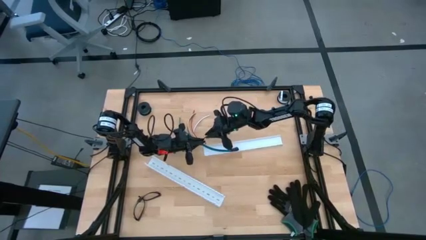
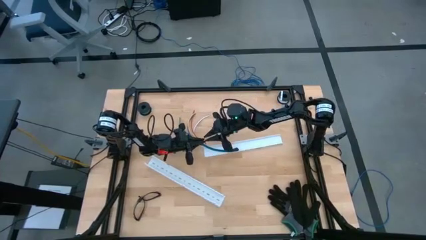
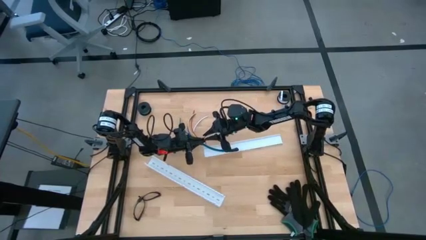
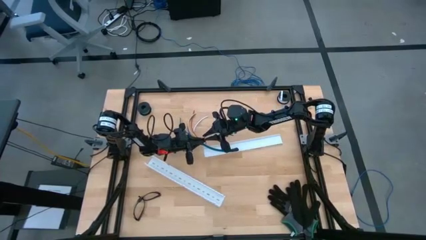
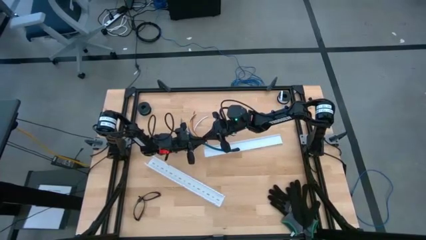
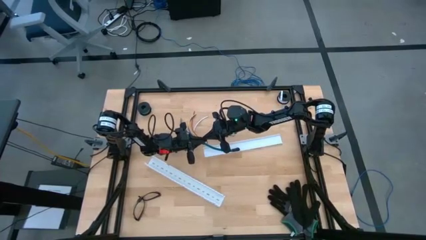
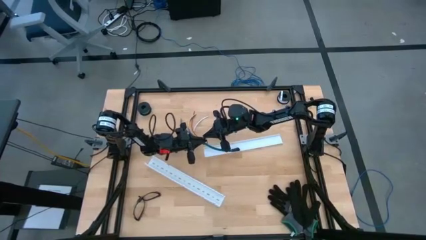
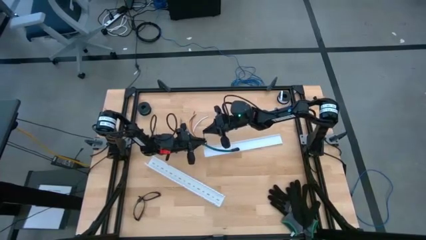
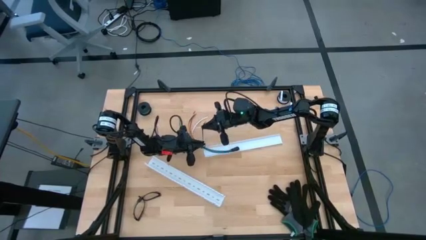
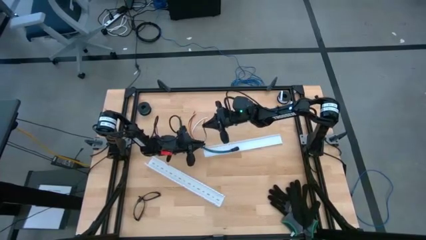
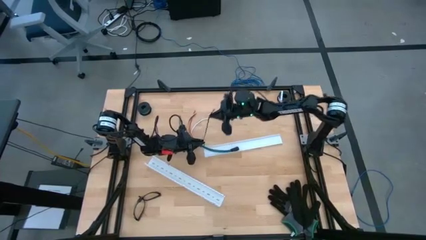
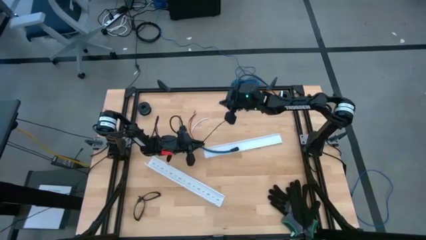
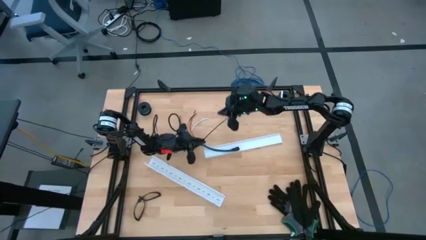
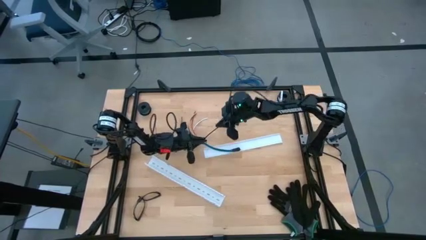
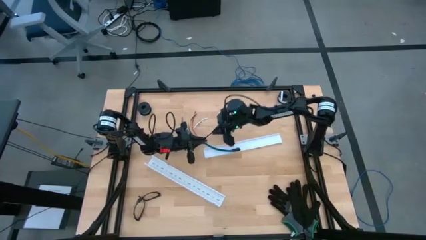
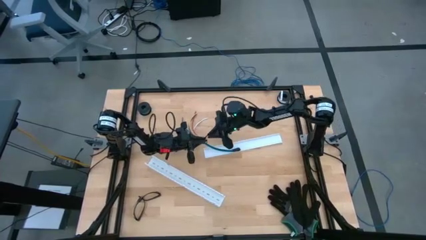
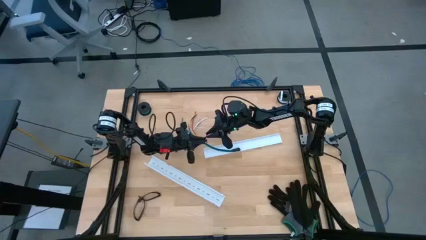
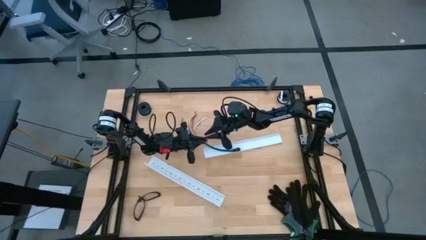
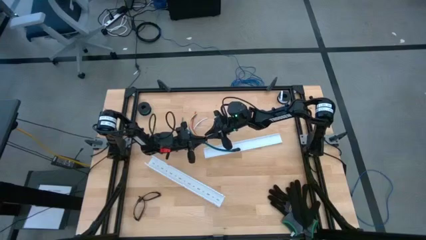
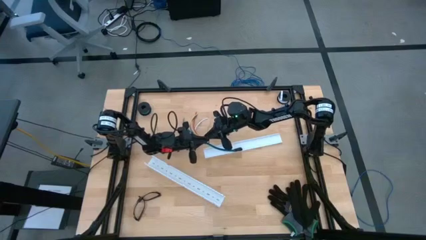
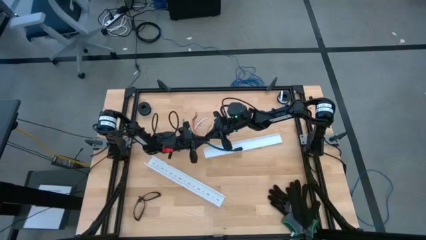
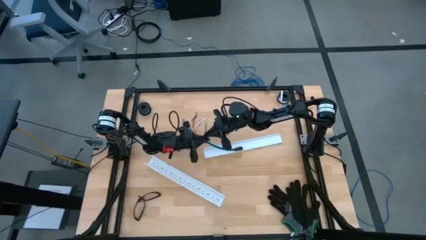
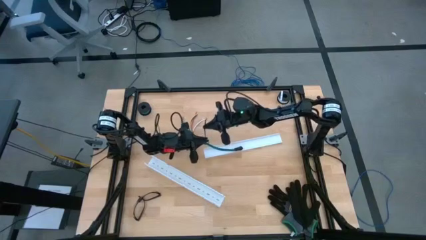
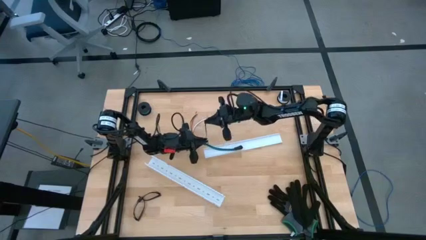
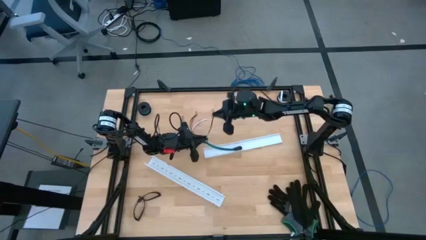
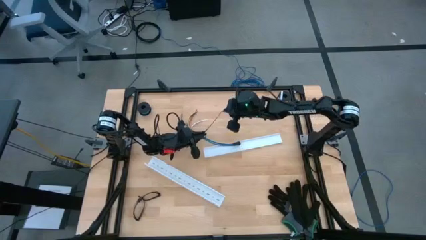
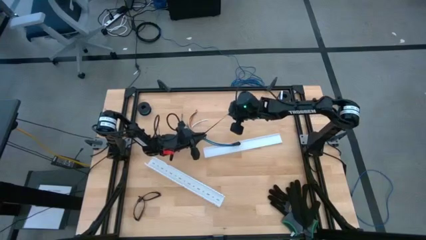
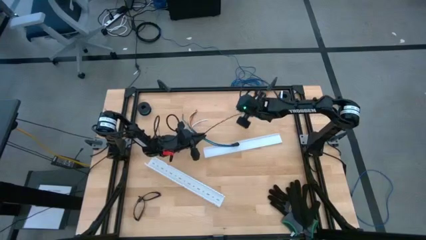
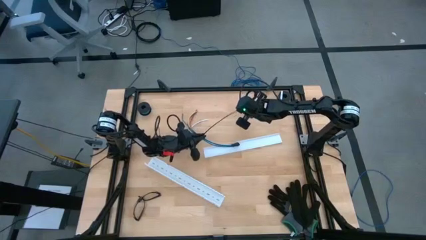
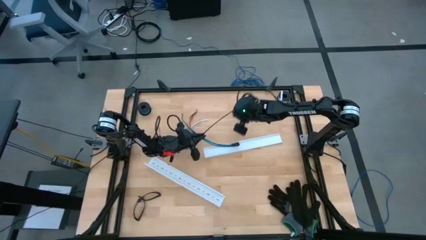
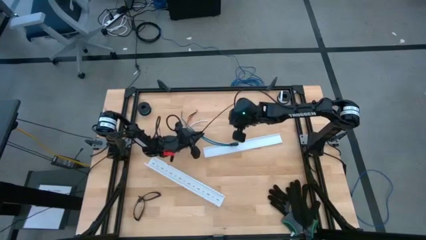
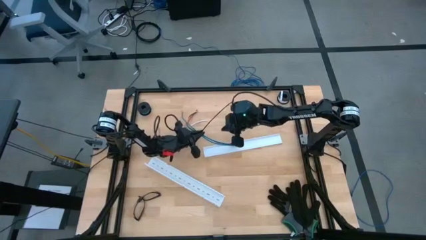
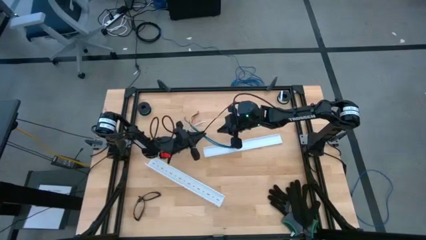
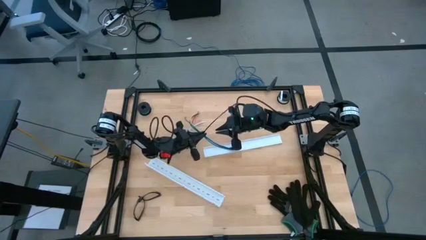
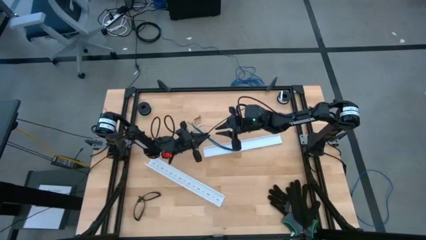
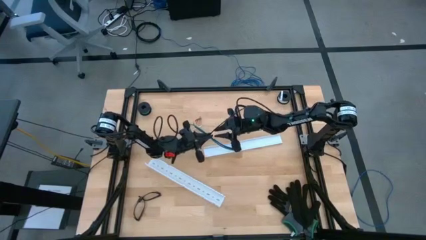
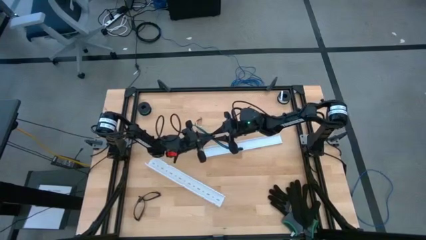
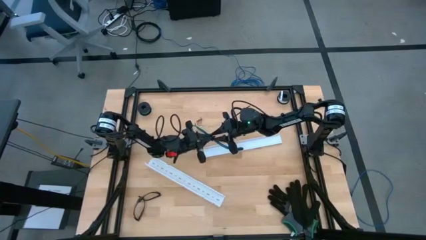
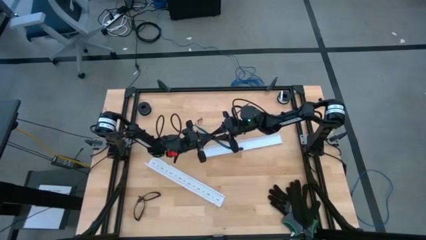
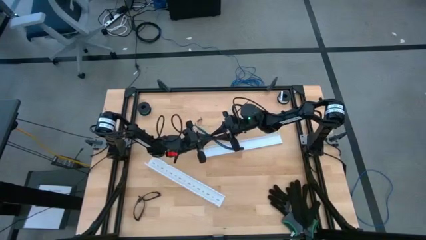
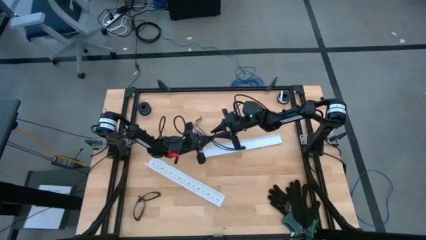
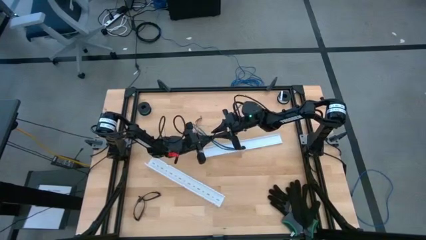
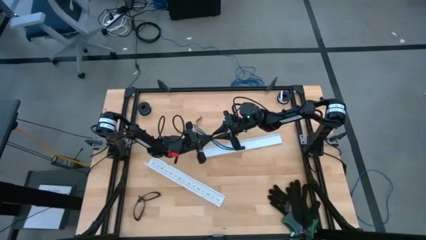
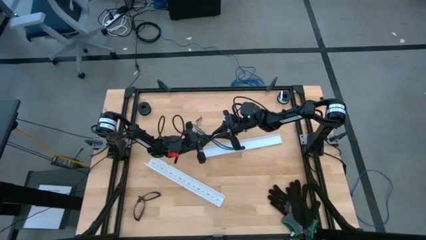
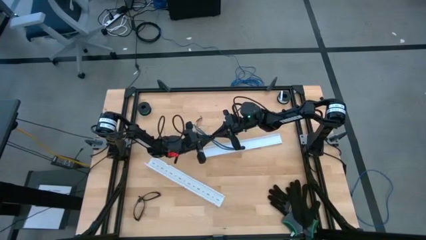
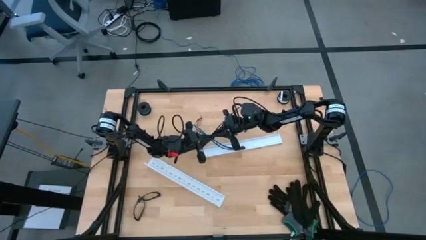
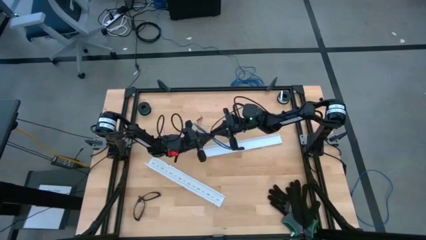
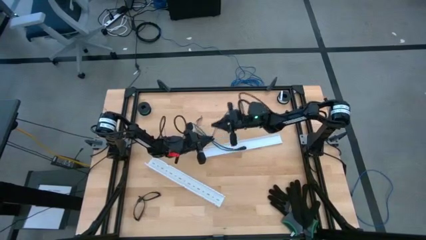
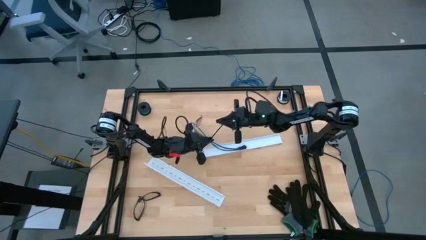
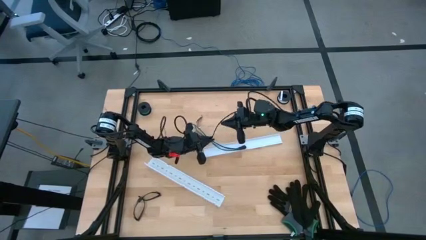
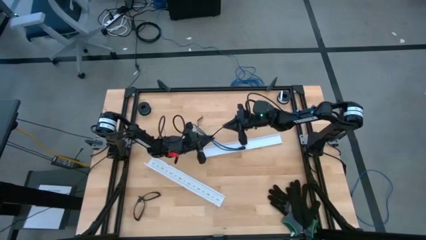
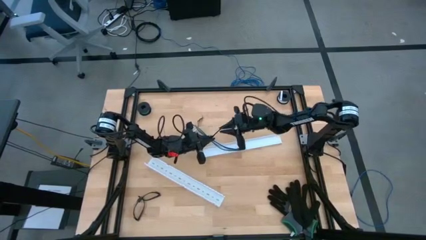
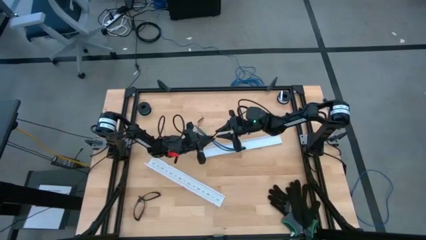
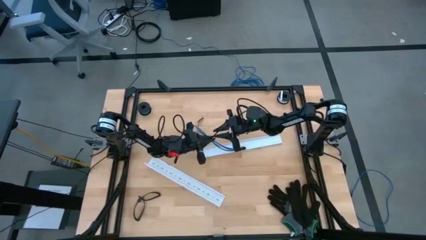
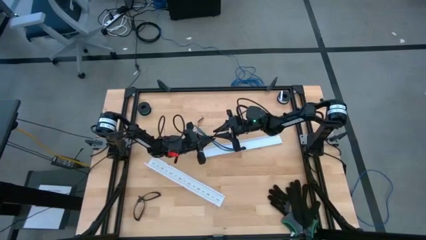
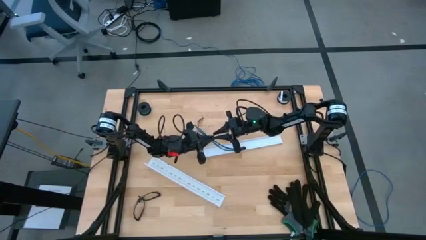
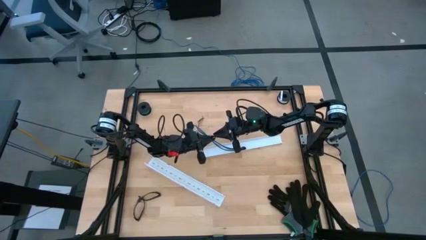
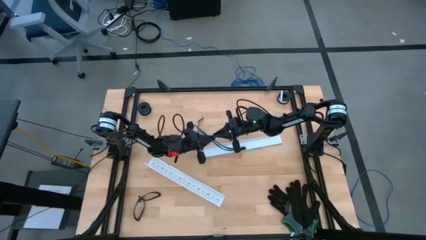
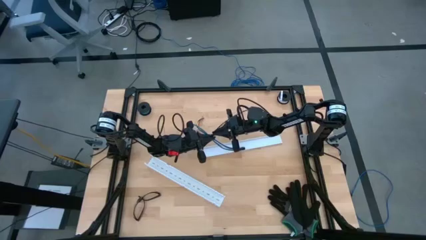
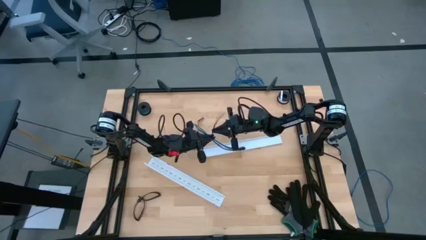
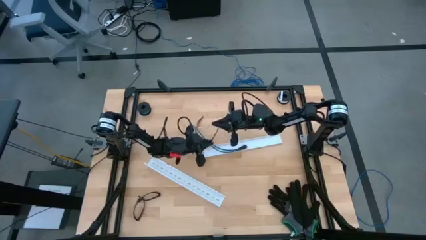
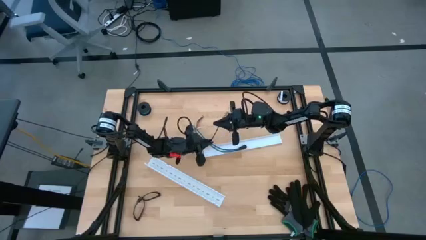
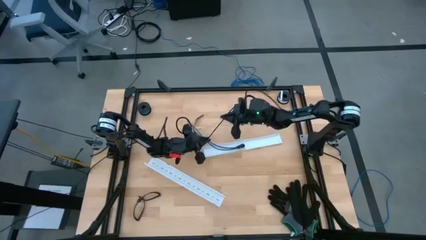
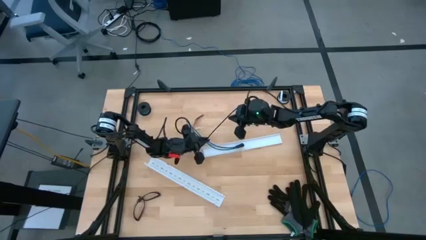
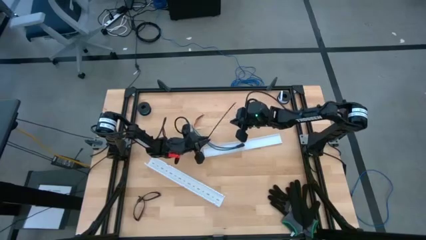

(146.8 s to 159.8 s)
Task: Ziptie cables
Wrap the cable wire in the zip tie

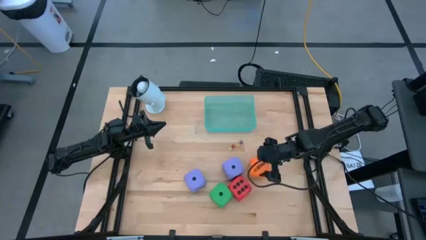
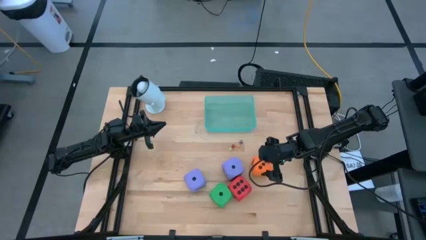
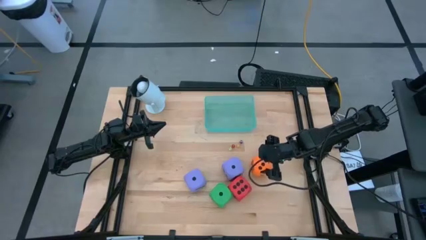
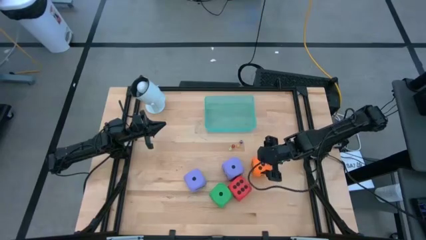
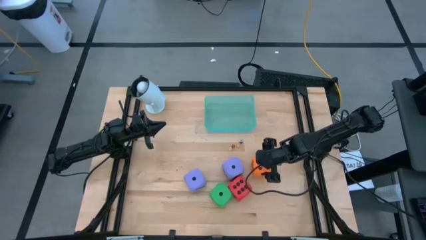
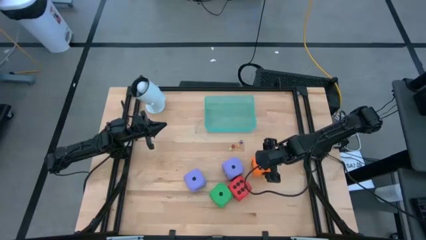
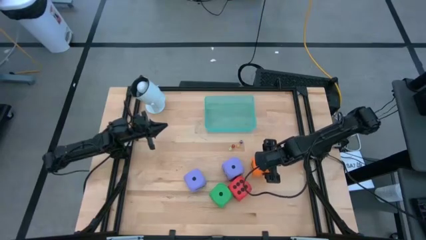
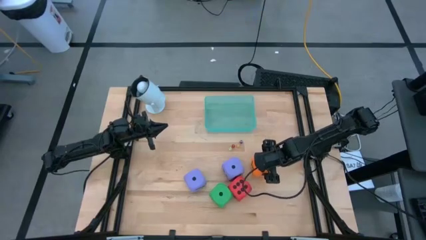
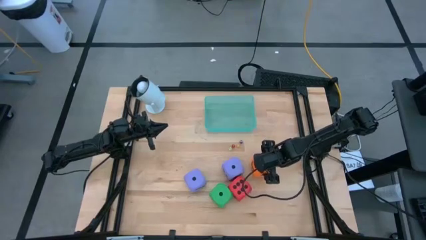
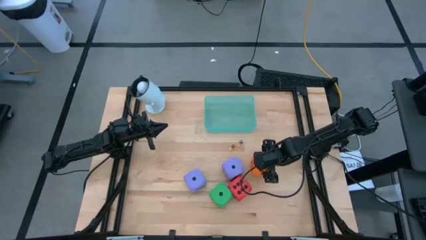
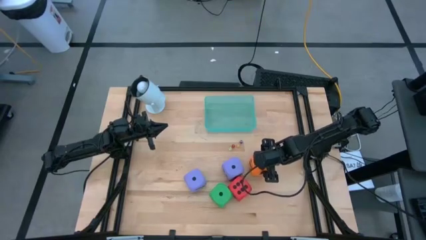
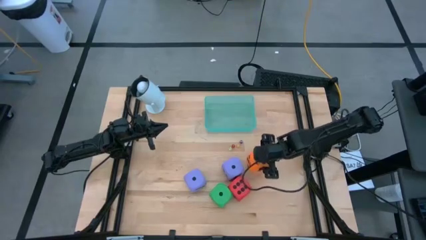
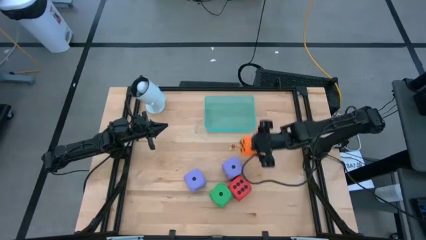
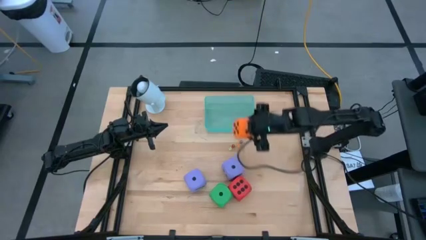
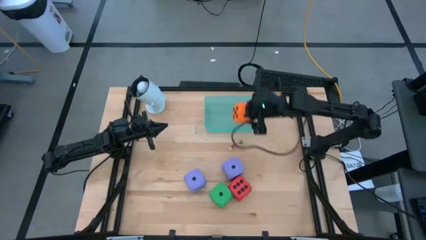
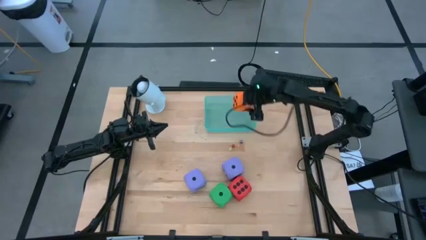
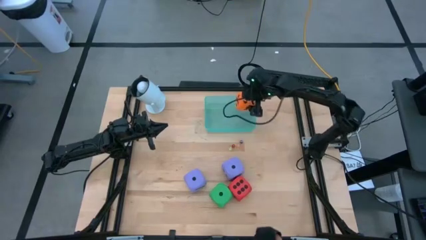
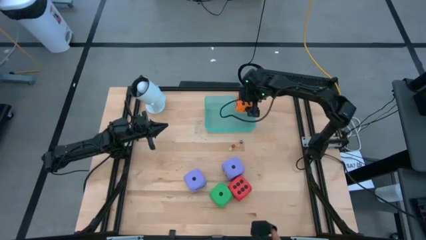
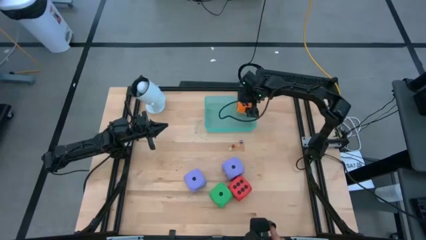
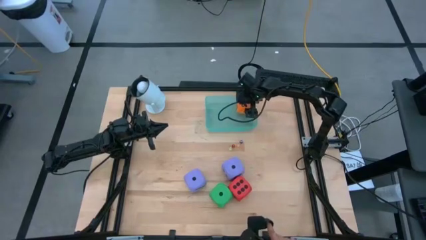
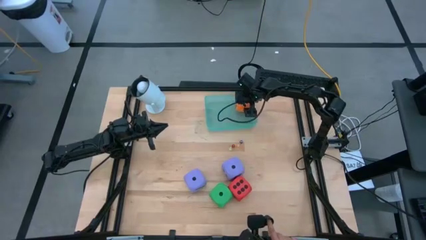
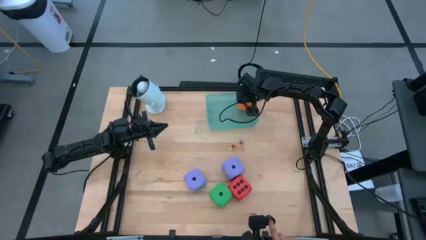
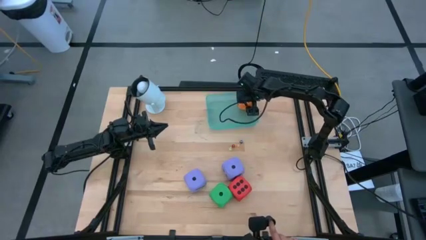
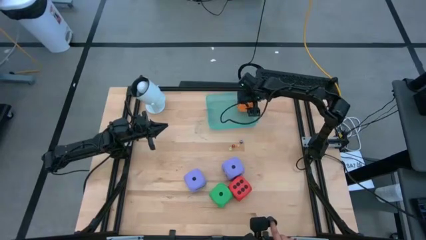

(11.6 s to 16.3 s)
Task: Pick & Place Dice
Put the big orange dice into the transparent blue bin
